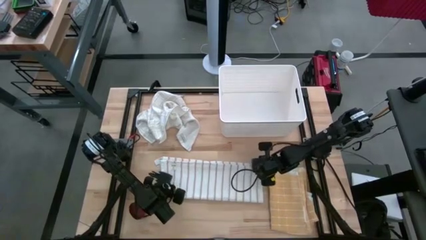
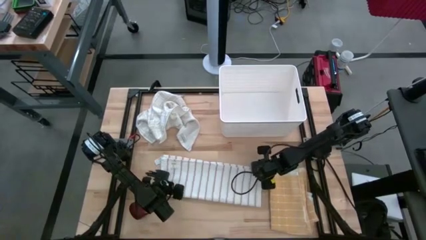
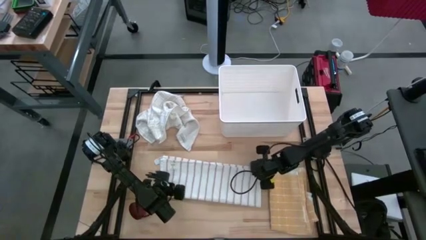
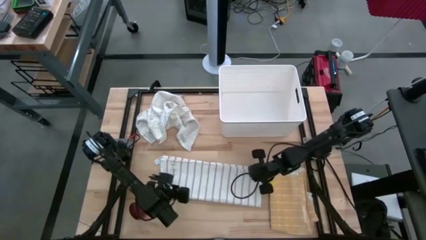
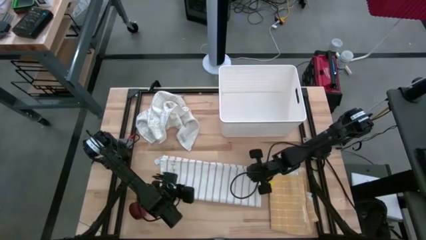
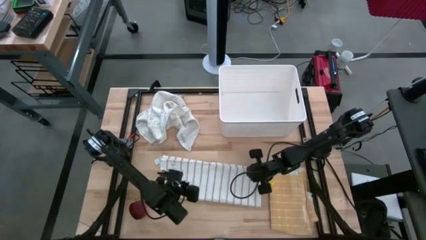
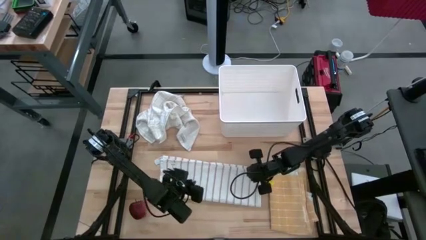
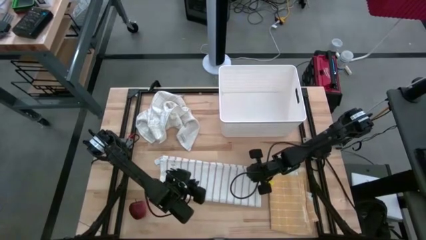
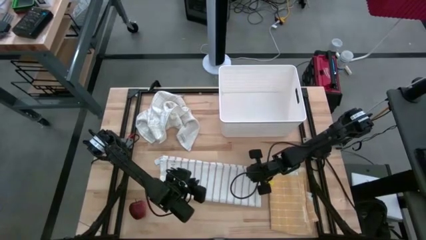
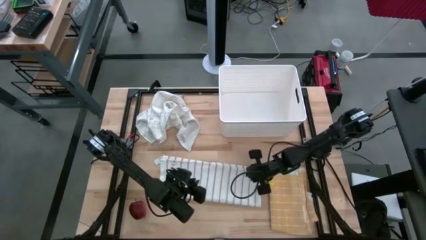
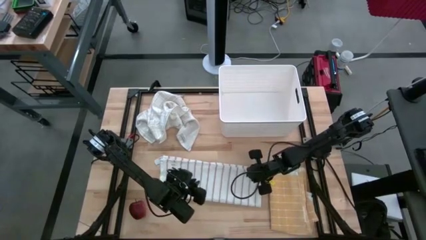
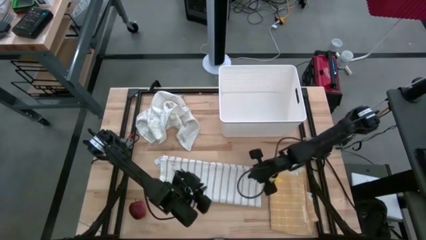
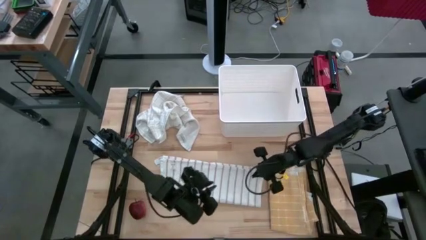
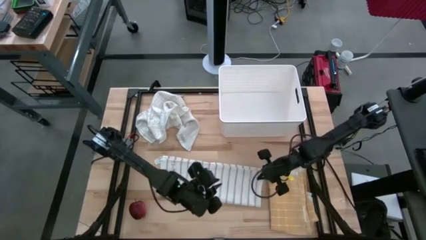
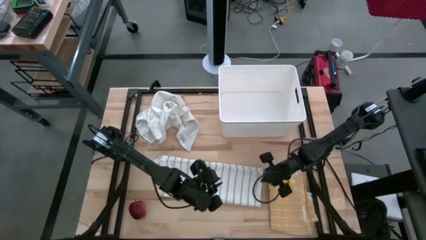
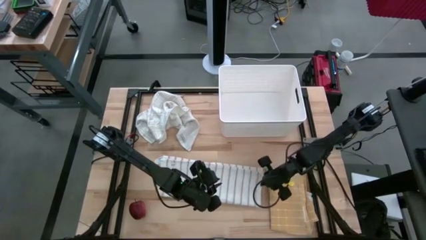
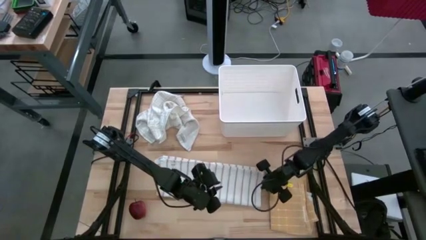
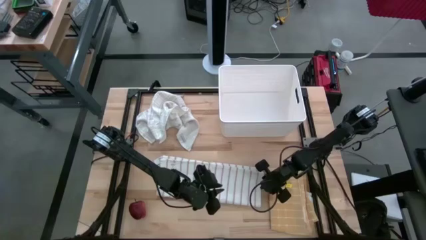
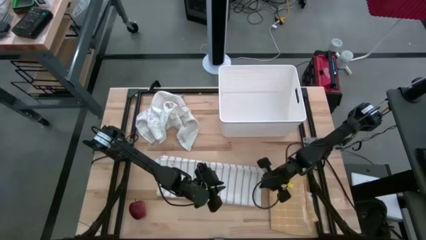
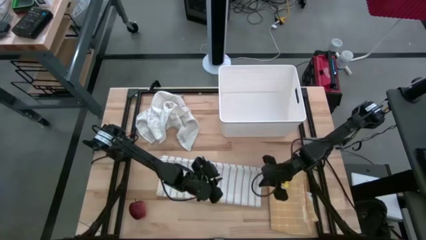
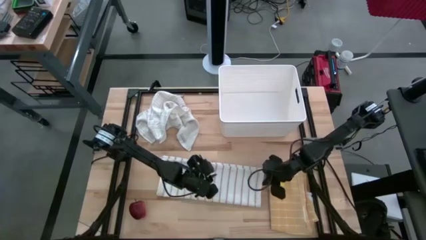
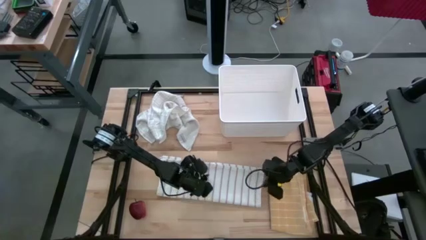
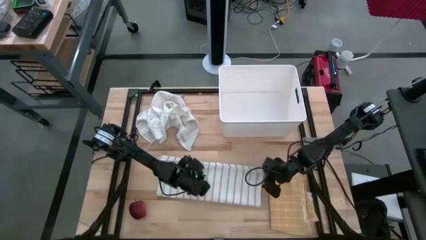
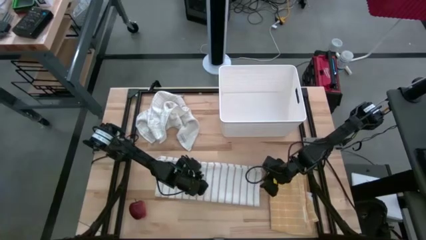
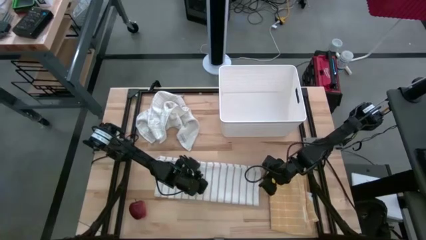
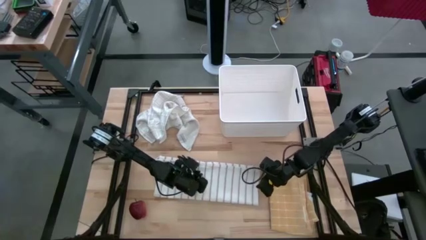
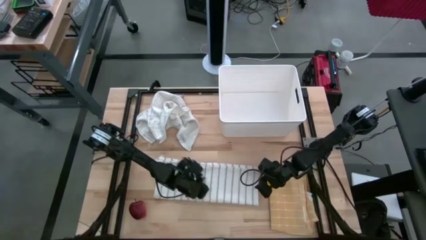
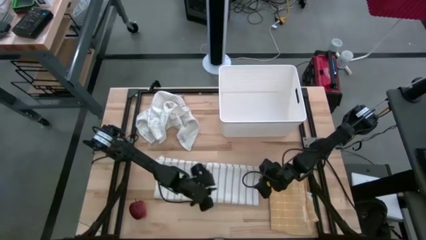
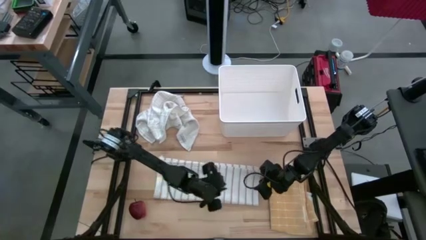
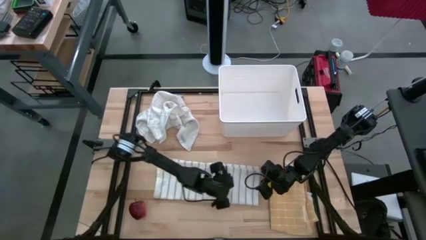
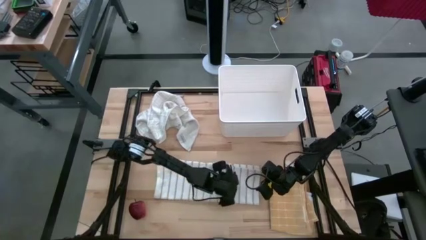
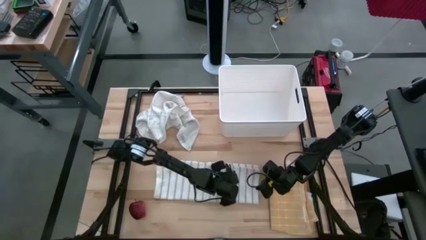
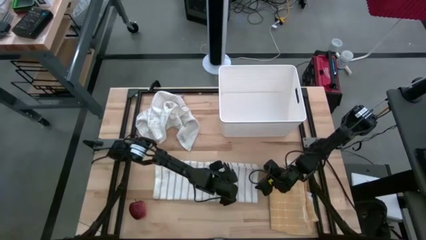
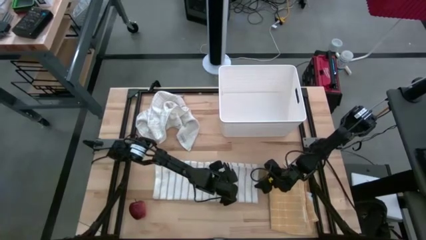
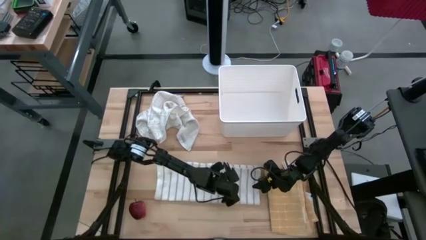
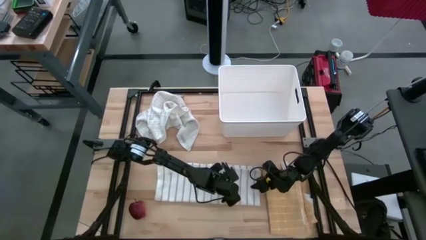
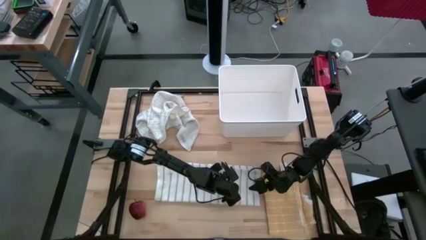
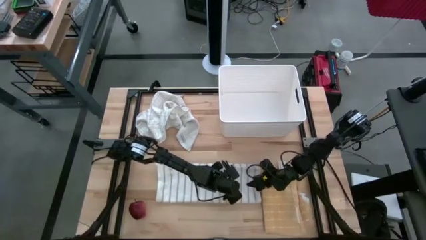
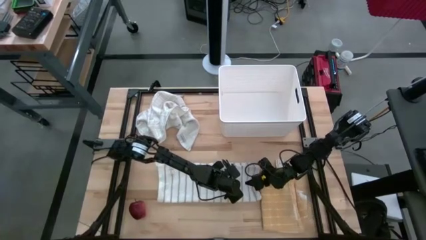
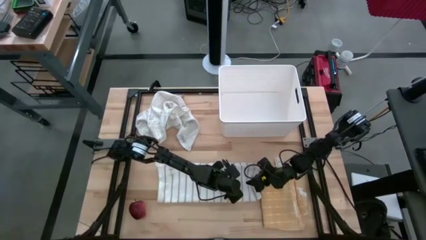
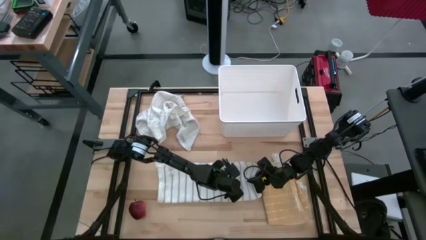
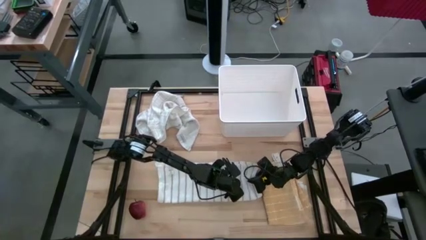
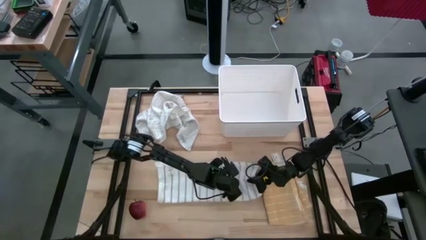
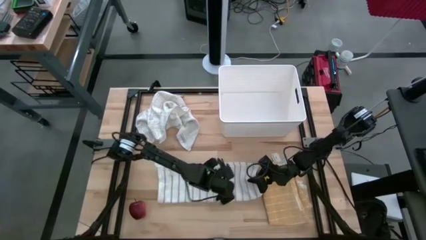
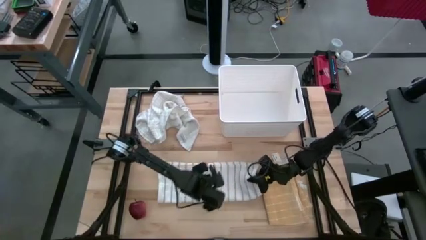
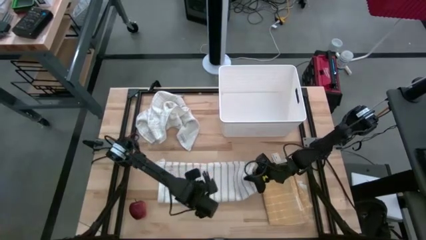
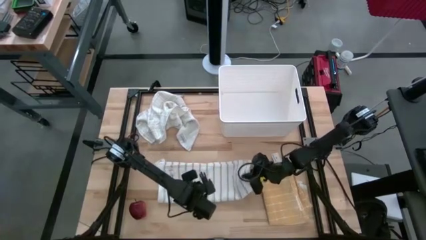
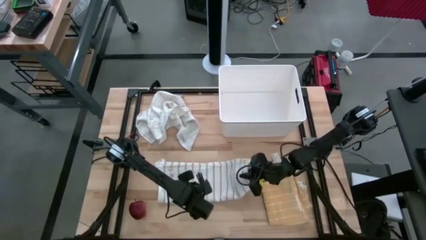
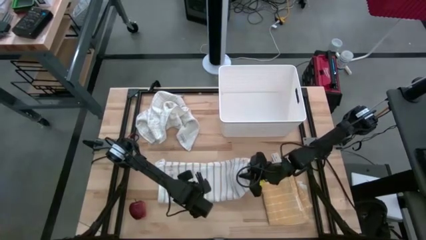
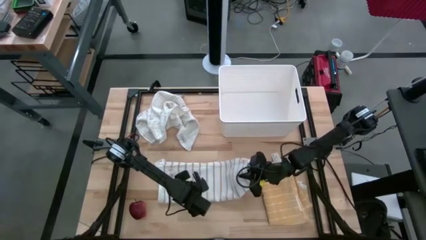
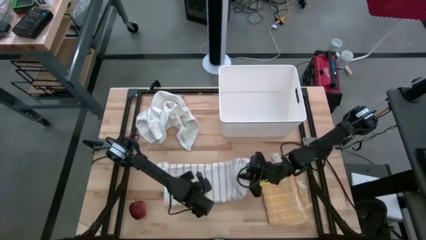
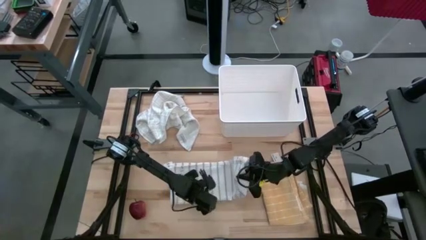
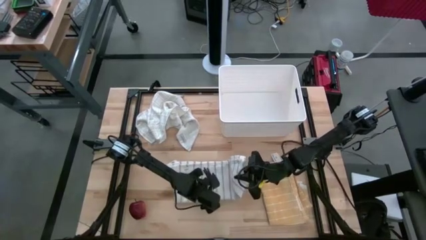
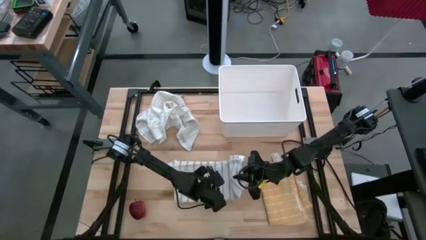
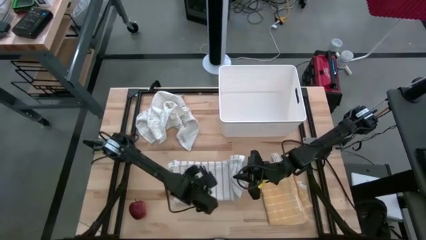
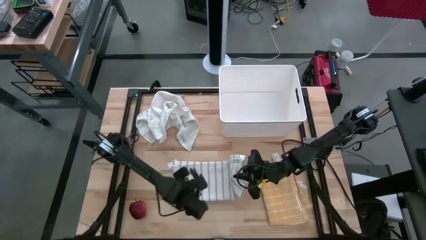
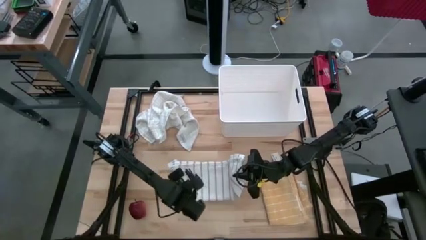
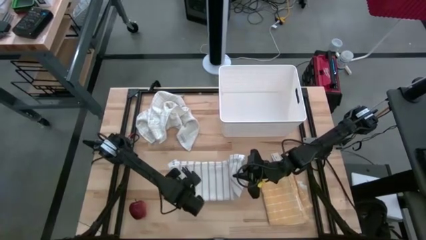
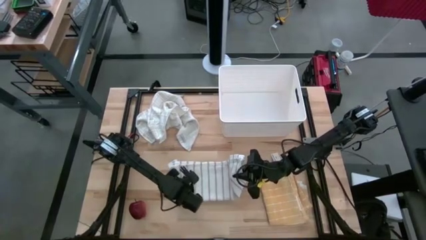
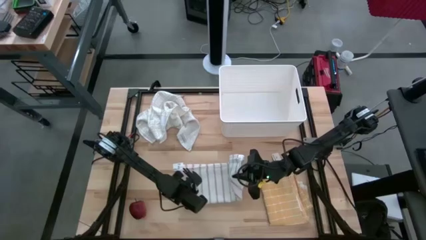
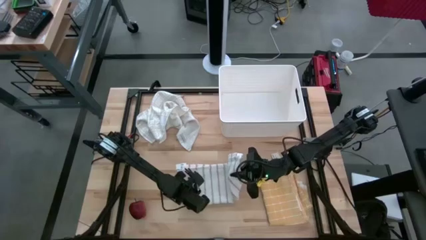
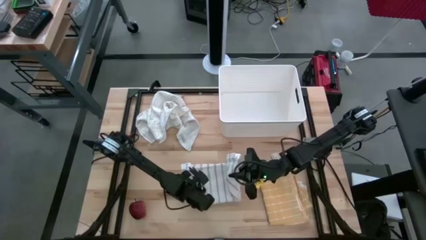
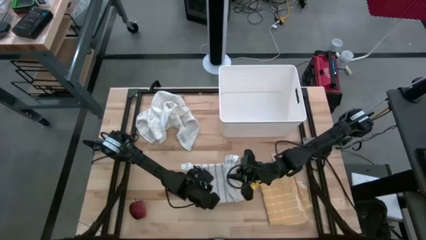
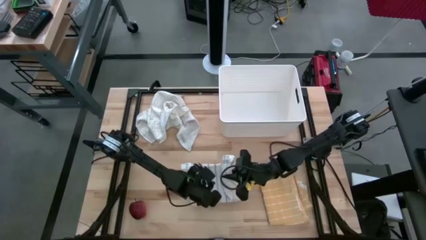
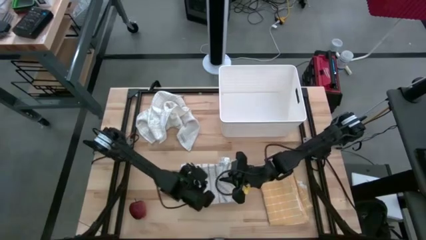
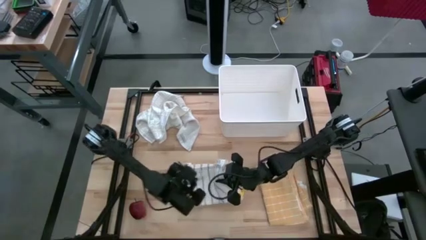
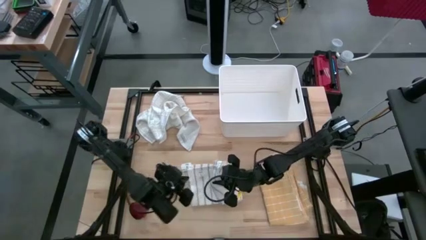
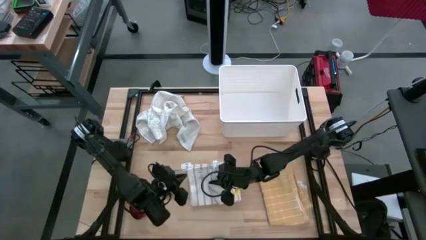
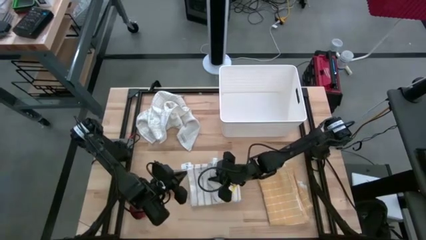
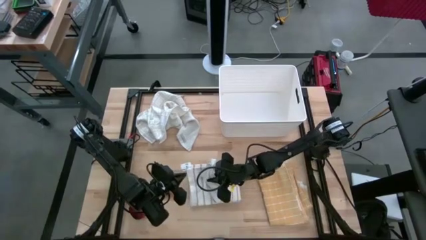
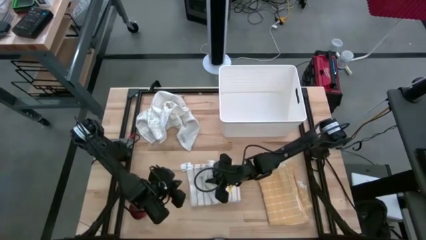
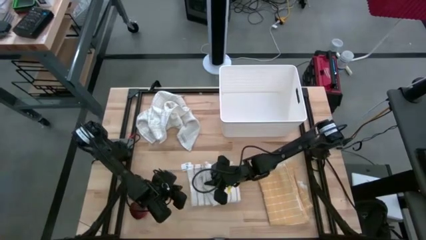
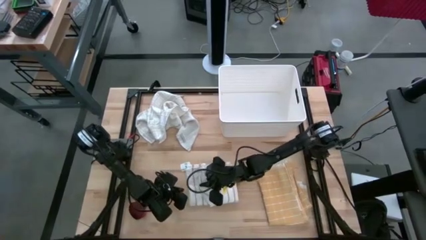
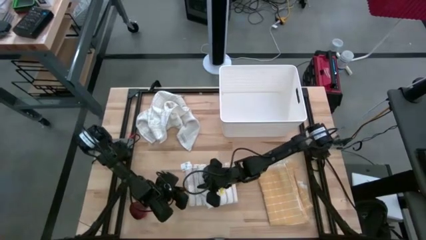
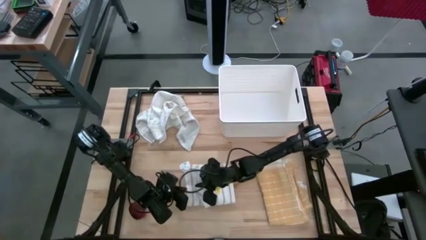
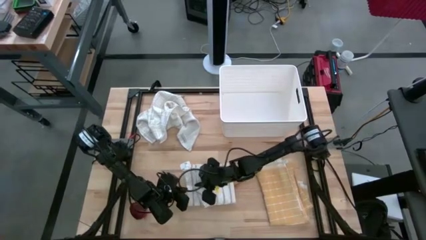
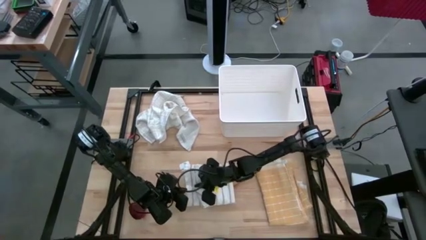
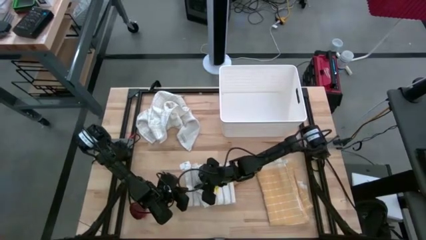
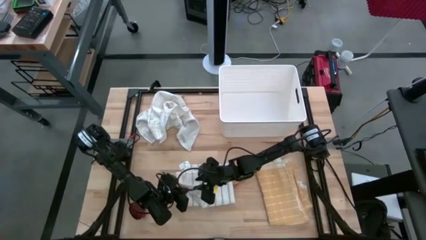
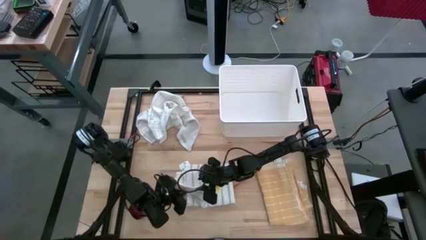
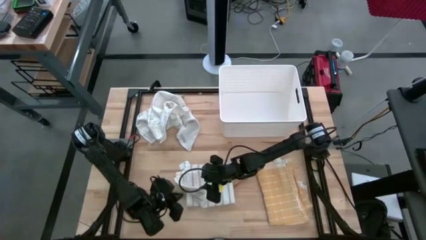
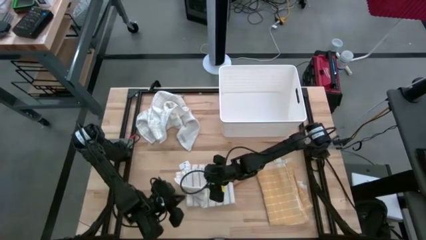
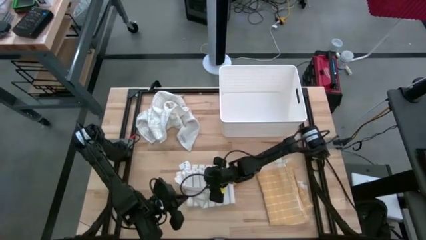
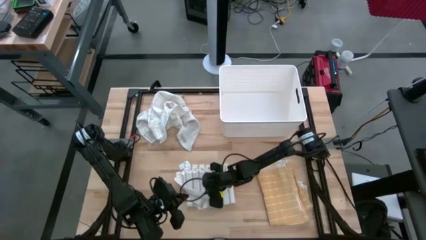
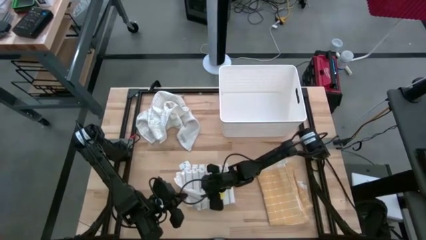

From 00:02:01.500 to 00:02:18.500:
Task: Fold towel
Fold the white striped towel
